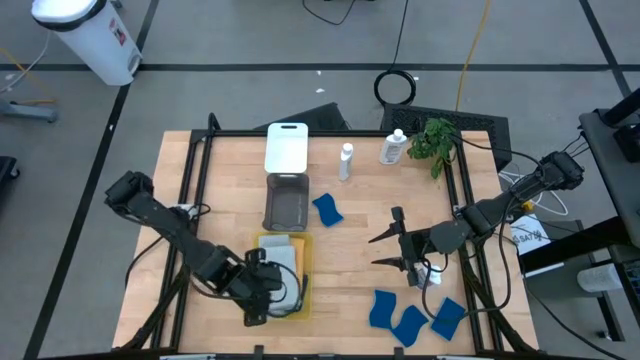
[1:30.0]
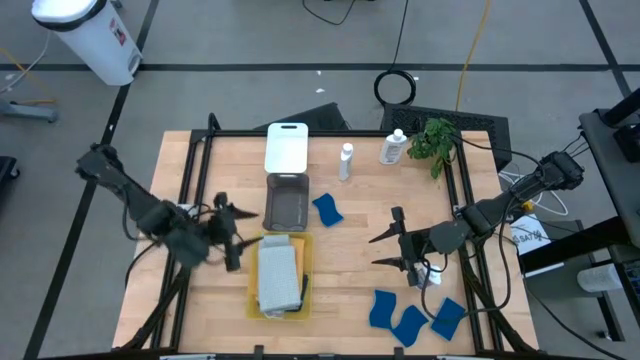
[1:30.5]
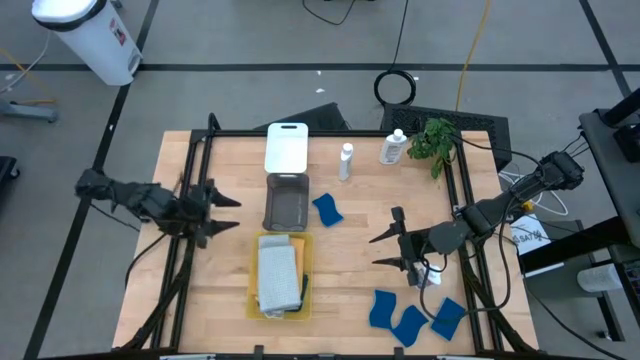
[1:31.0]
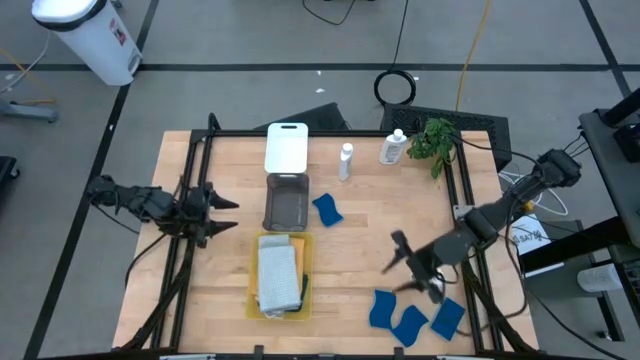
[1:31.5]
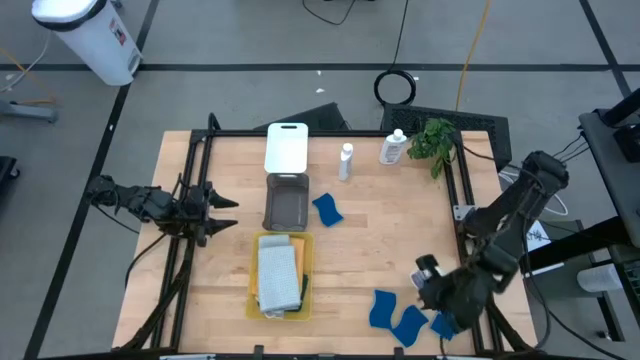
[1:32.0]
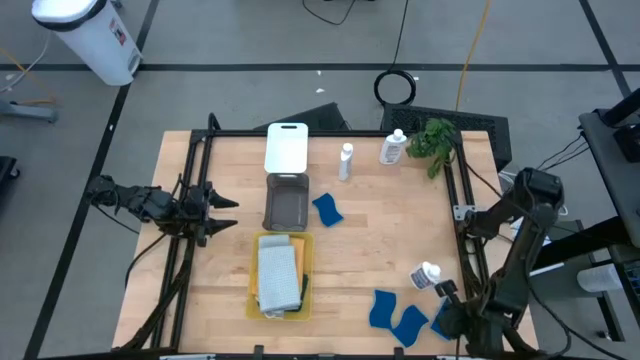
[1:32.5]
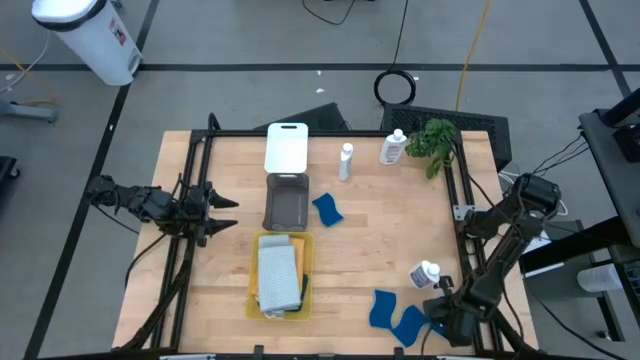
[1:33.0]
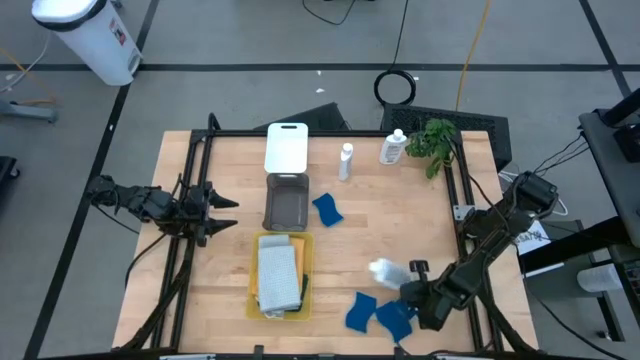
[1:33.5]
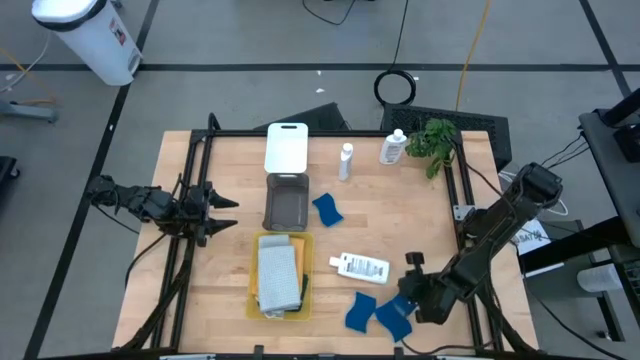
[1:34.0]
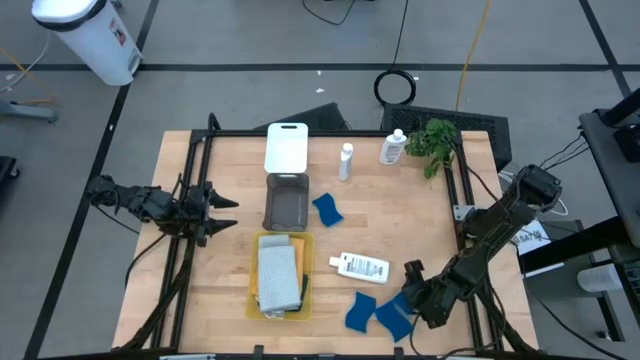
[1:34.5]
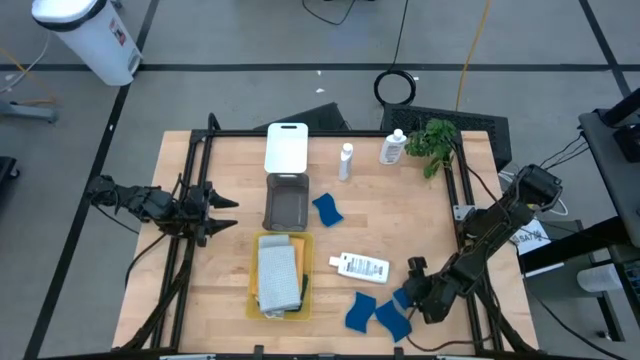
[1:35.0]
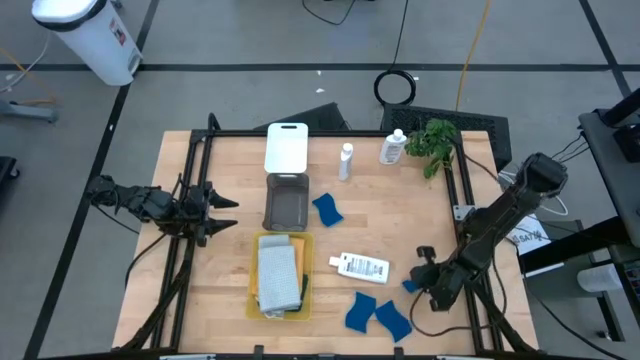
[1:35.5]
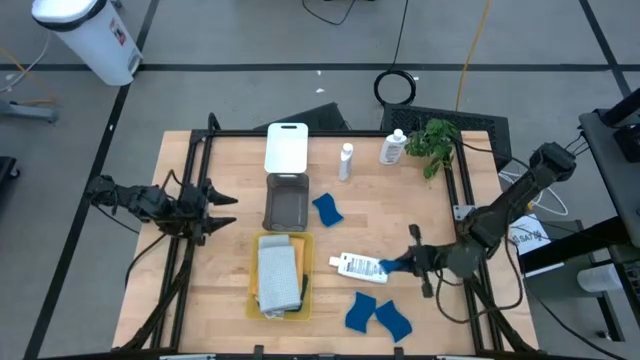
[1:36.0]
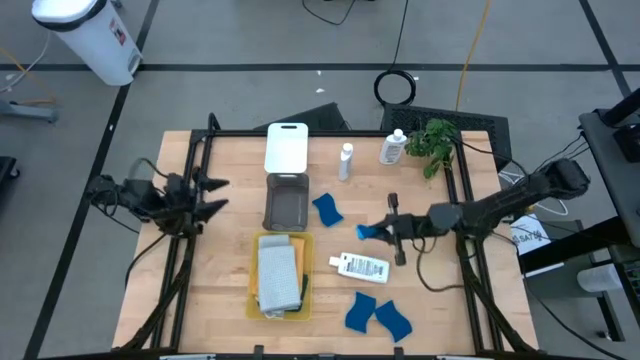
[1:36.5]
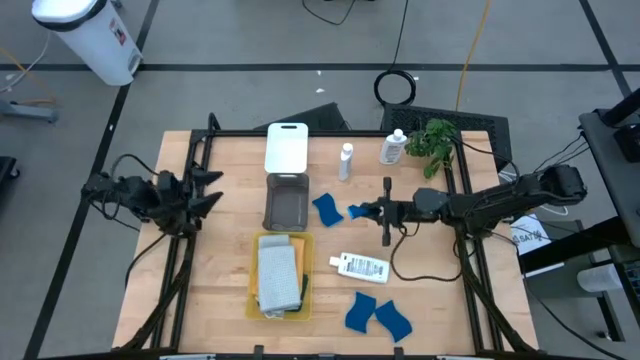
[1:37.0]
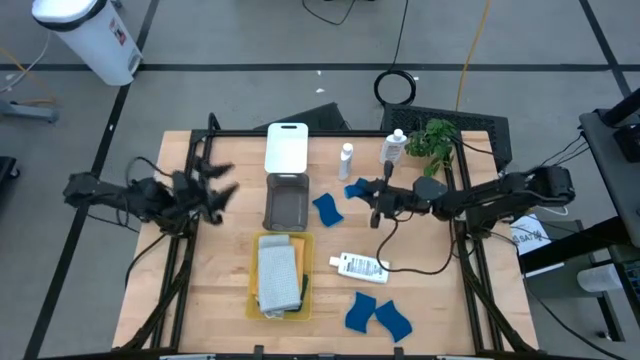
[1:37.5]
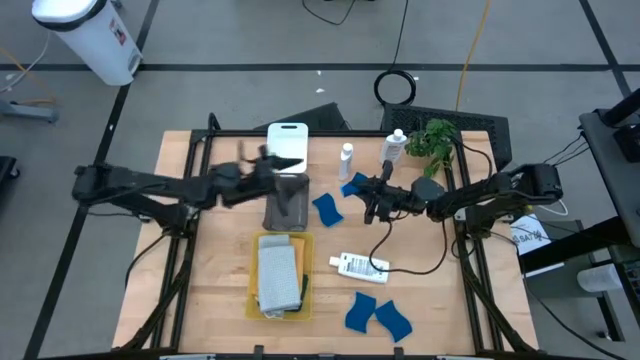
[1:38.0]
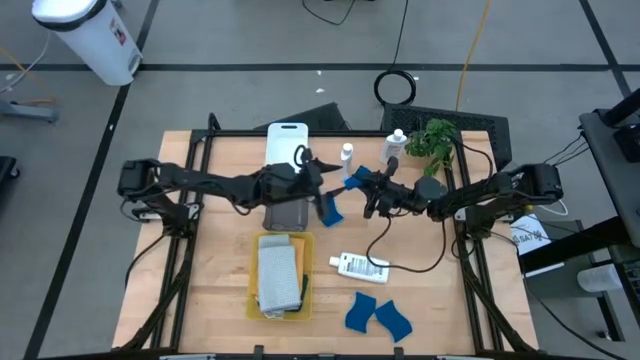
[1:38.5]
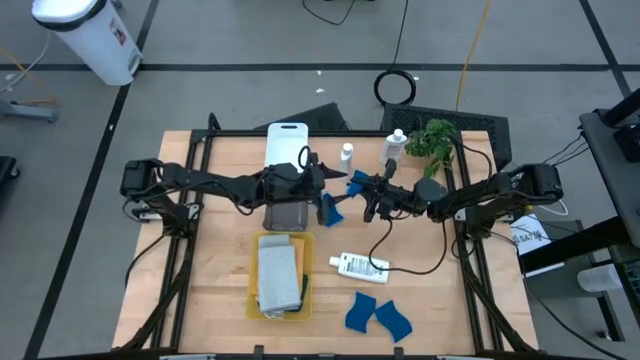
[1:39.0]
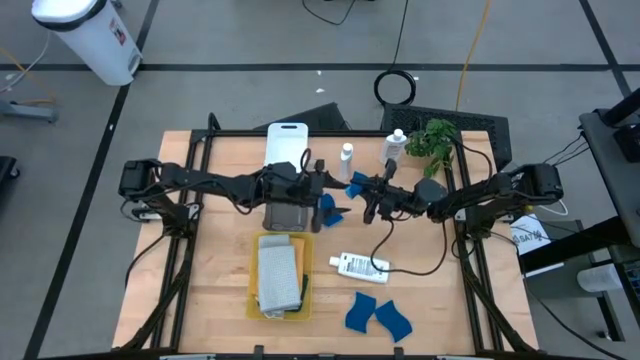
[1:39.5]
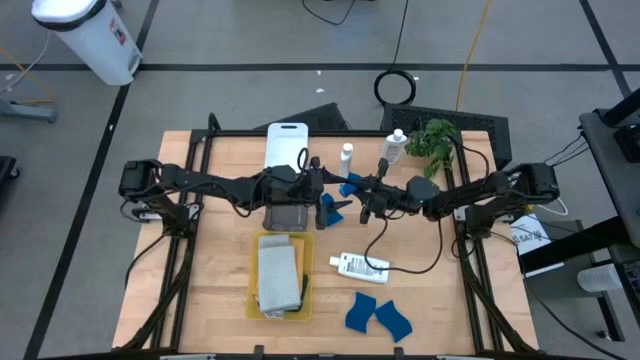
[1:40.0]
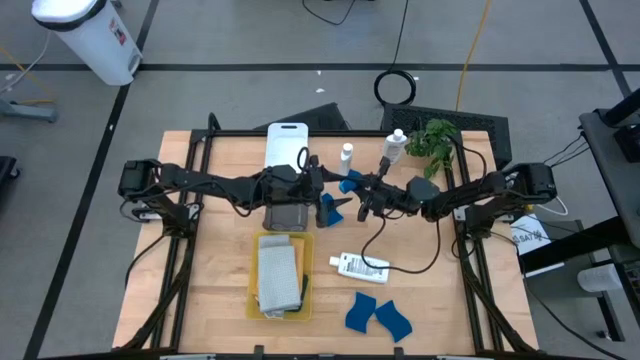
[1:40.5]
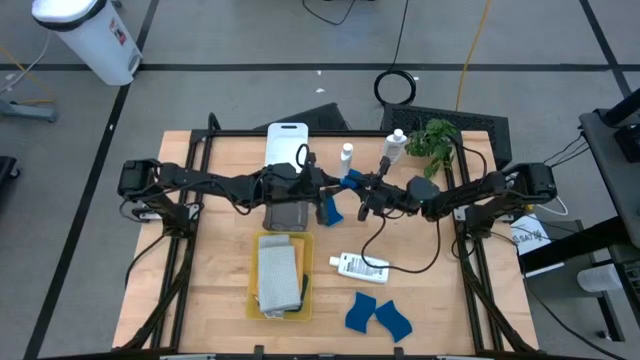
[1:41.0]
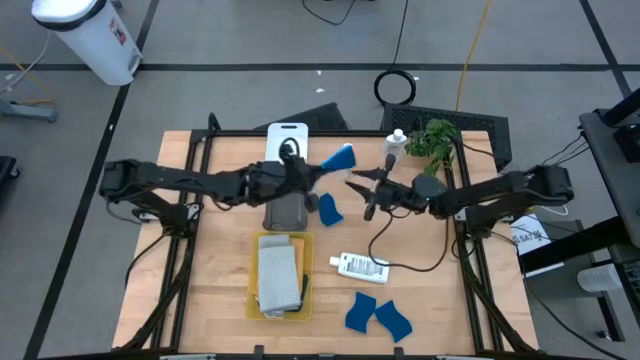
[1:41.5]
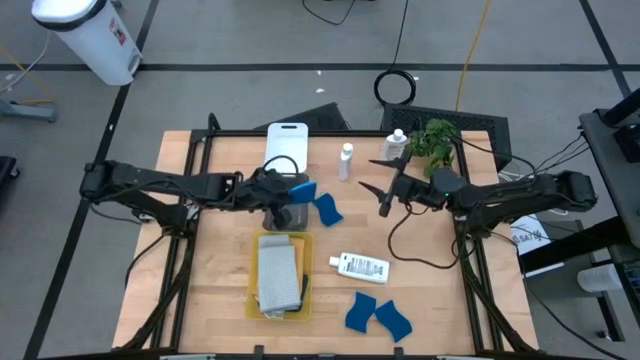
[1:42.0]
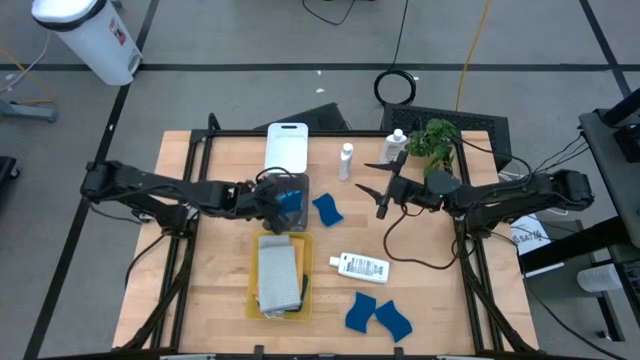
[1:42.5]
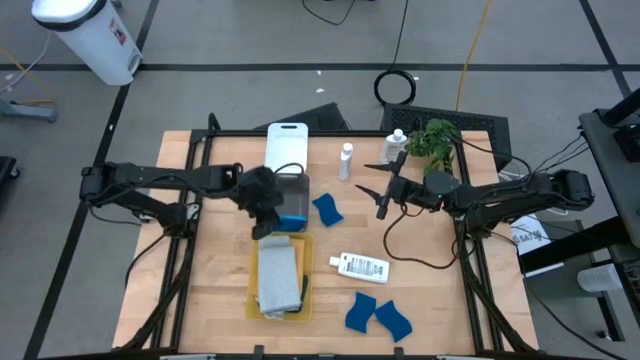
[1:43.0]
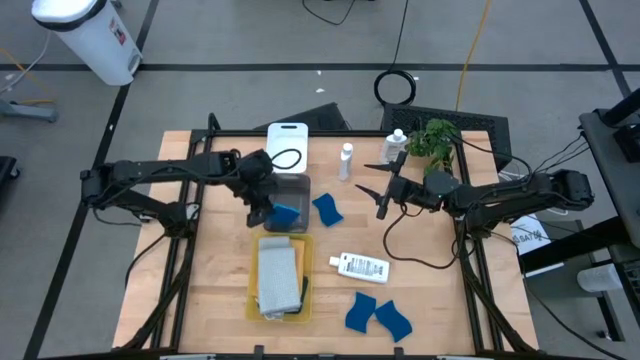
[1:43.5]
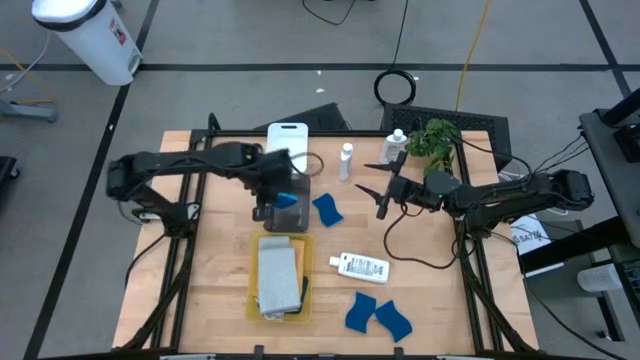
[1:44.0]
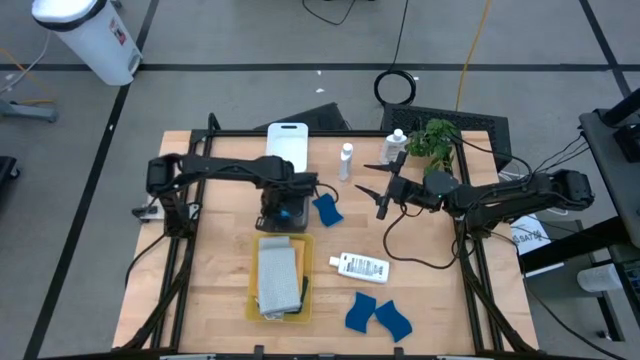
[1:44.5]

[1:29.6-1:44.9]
Task: Pick & Place Kitchen Items
Put the blue sponge into the black bin

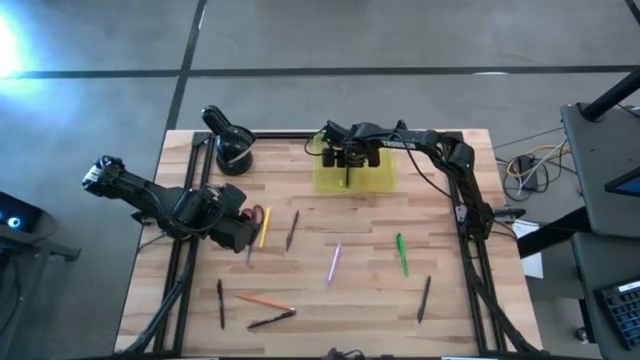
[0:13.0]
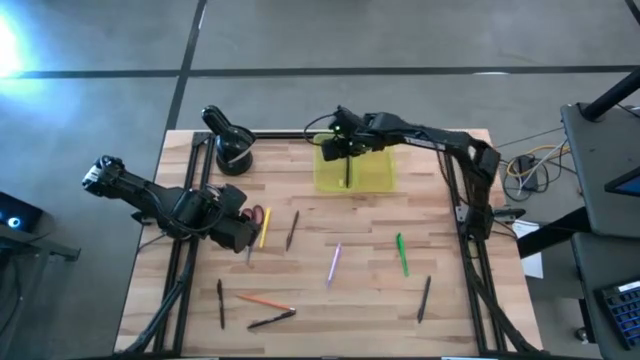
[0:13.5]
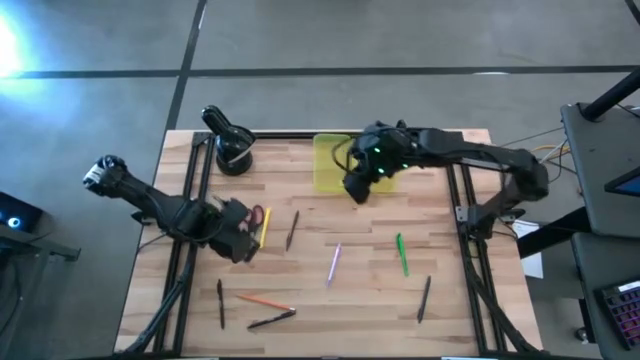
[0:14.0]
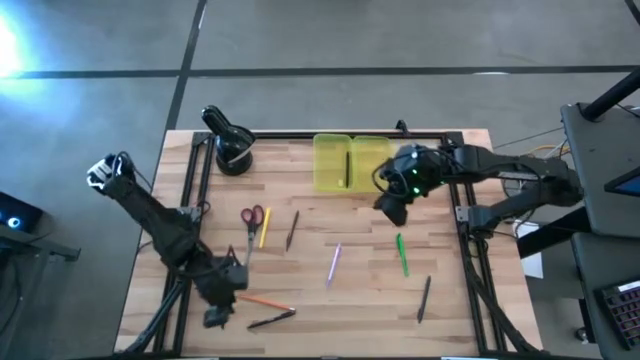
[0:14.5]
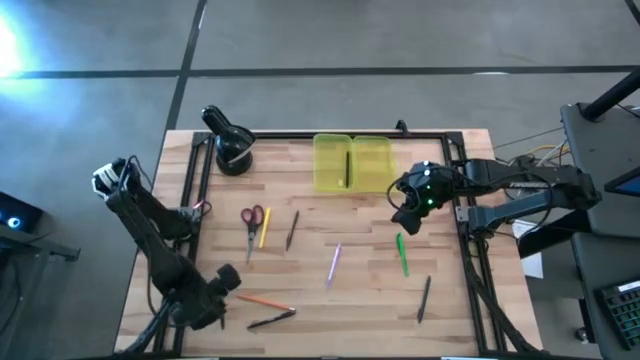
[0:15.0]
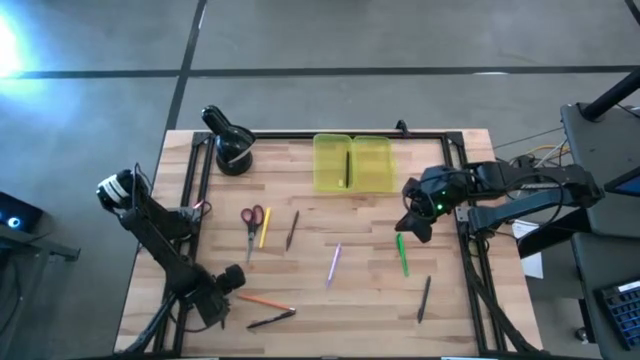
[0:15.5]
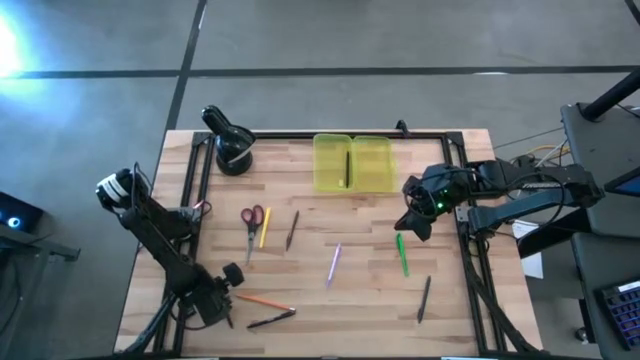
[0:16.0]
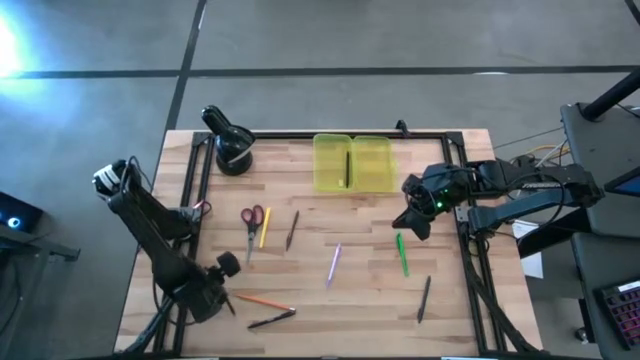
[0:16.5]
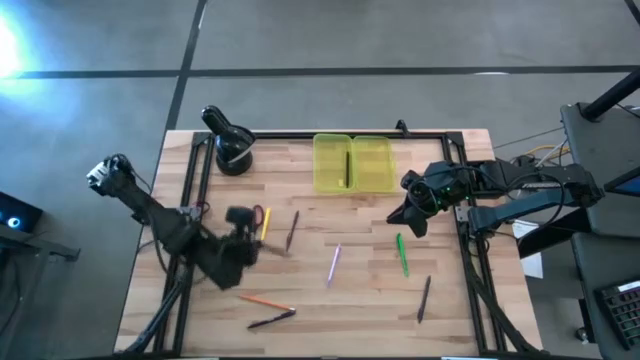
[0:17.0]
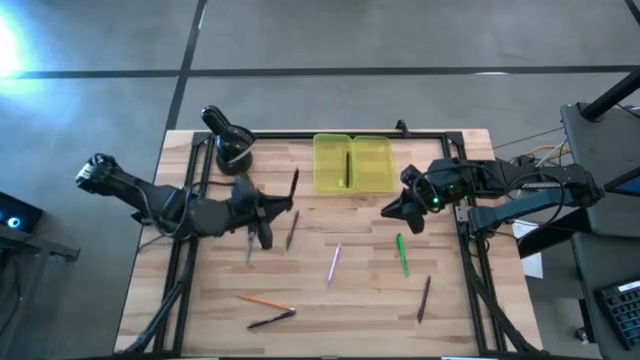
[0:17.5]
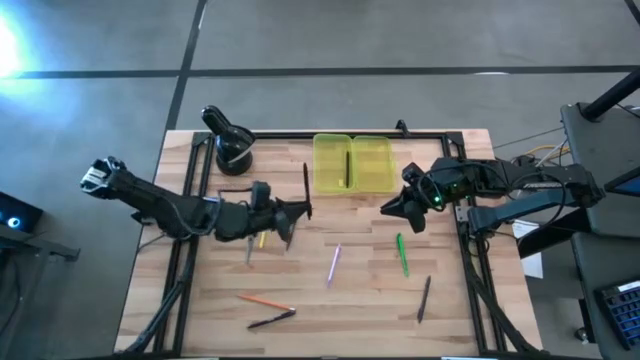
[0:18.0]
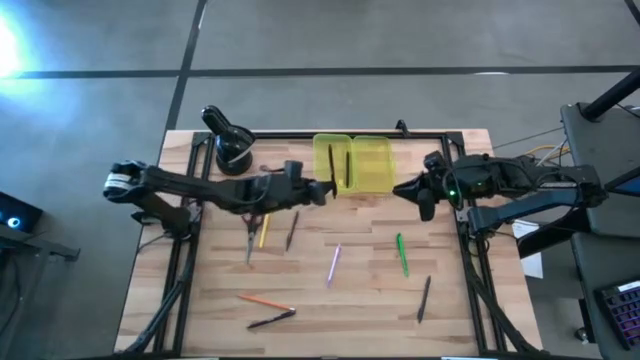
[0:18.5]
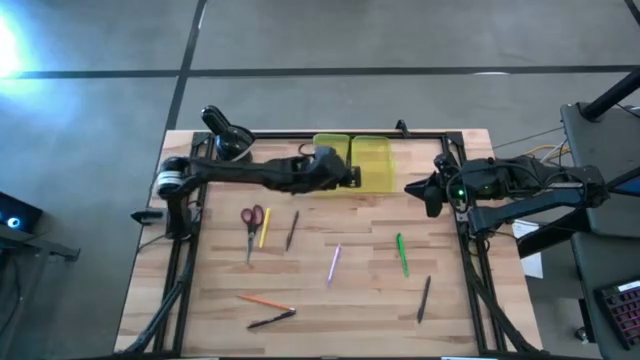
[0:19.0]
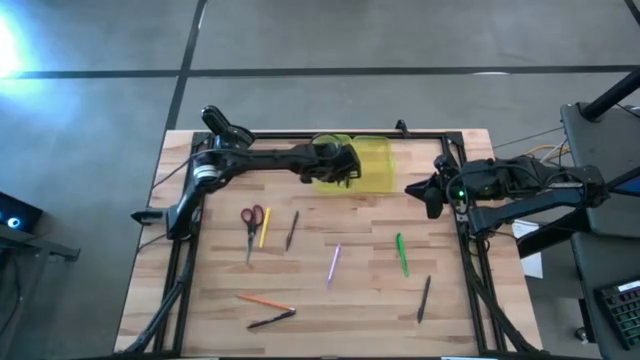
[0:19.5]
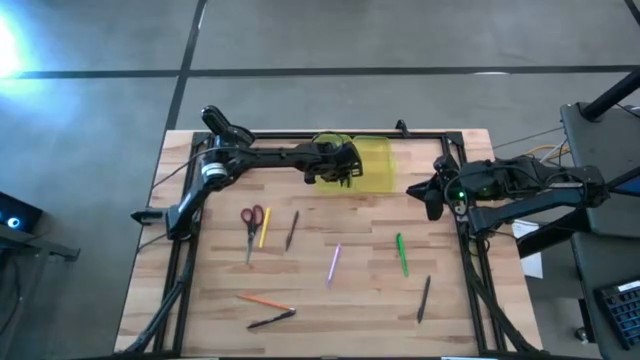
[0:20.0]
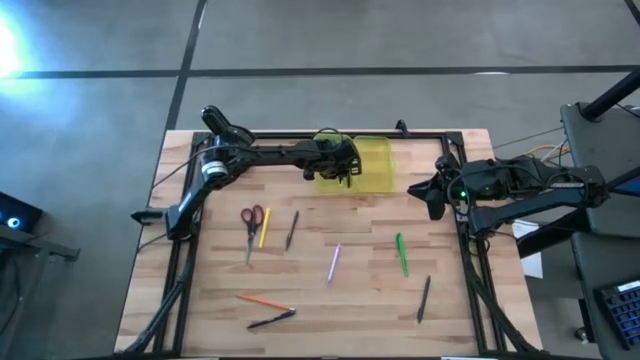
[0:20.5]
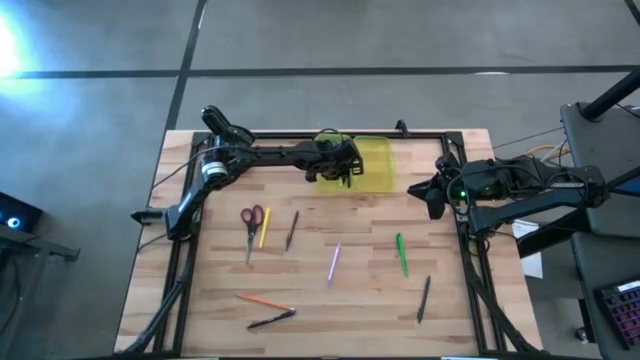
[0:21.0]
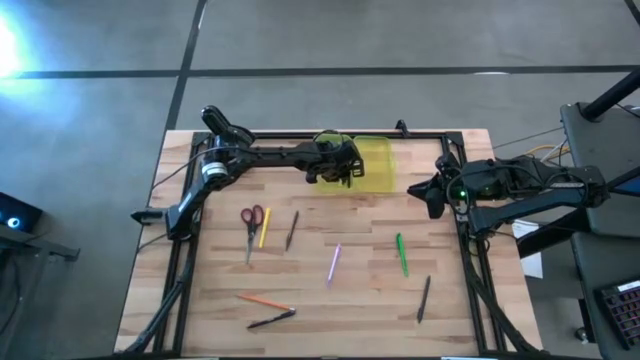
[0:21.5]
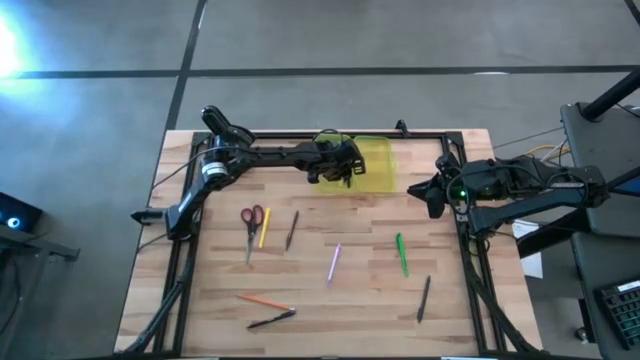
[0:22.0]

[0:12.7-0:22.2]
Task: Pick & place school supplies into a supply box
Put the black pen into the yellow supply box
